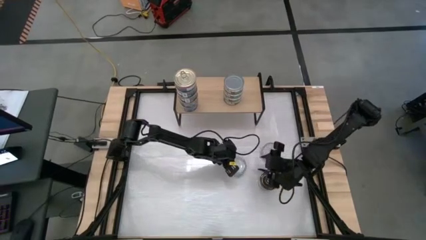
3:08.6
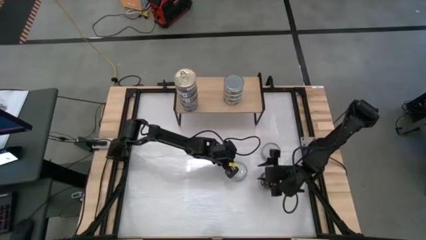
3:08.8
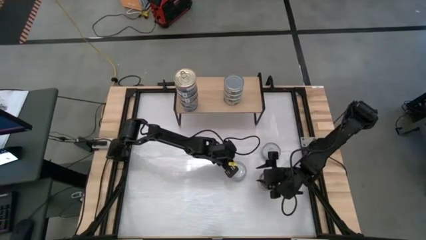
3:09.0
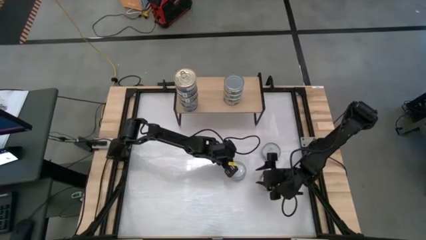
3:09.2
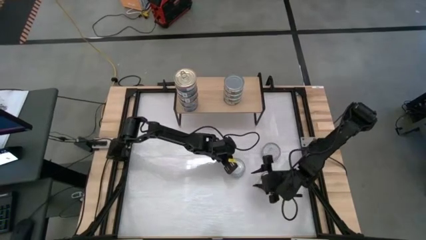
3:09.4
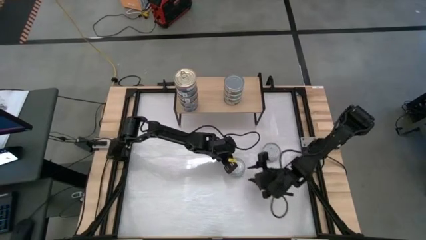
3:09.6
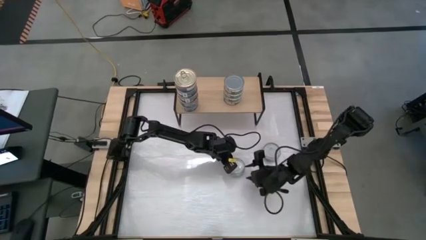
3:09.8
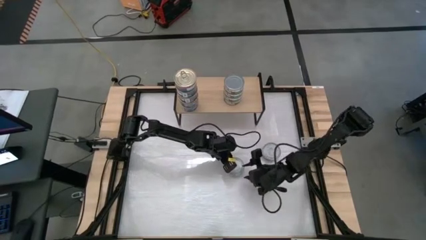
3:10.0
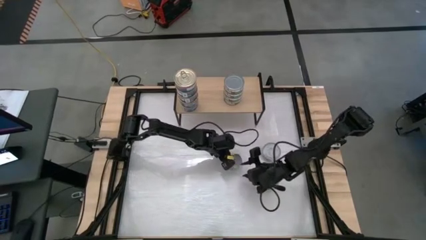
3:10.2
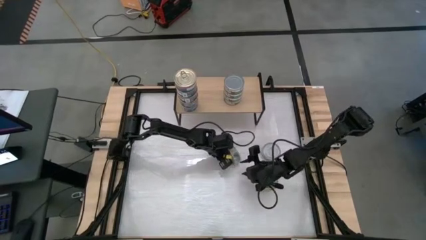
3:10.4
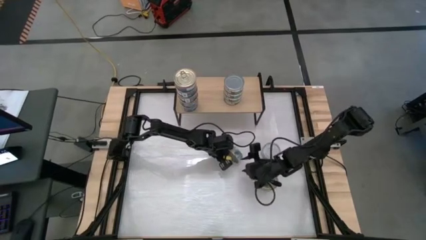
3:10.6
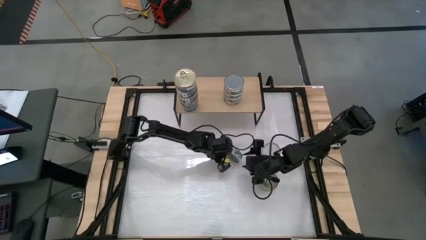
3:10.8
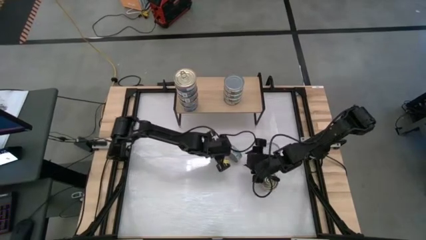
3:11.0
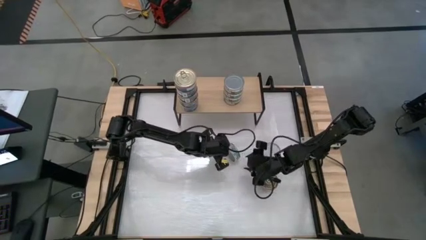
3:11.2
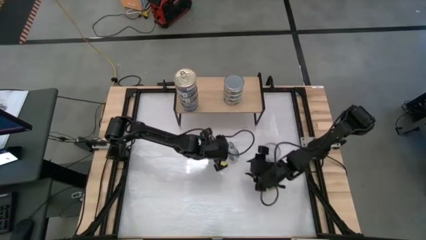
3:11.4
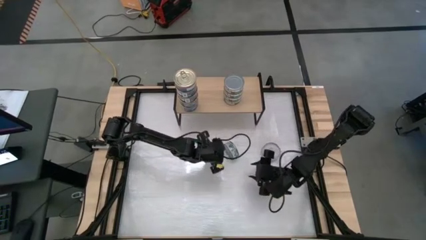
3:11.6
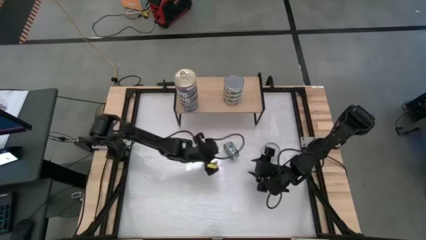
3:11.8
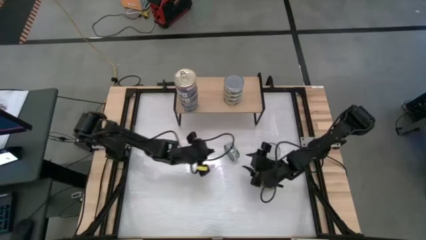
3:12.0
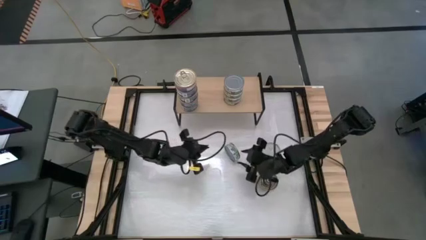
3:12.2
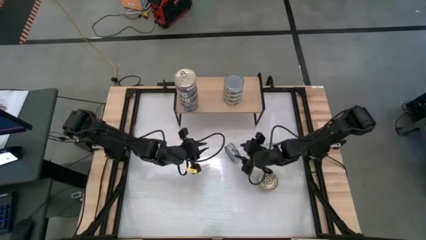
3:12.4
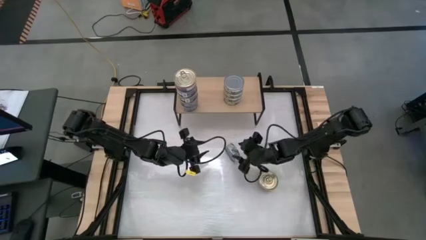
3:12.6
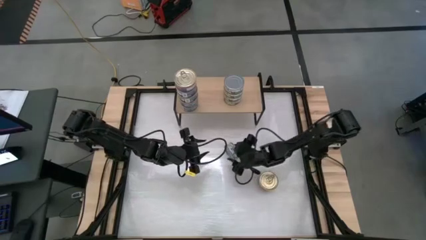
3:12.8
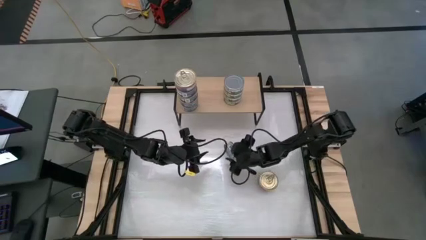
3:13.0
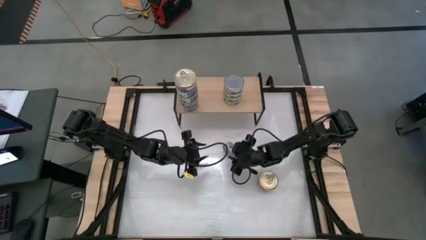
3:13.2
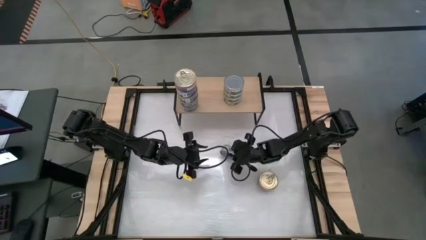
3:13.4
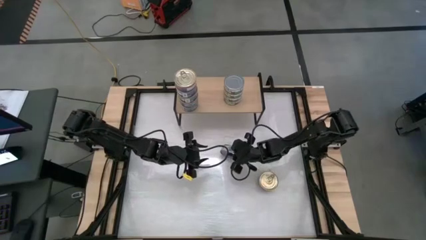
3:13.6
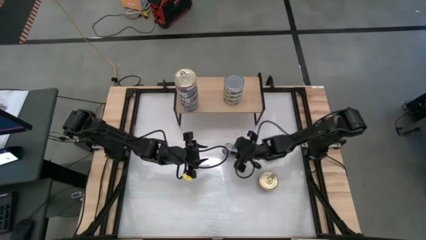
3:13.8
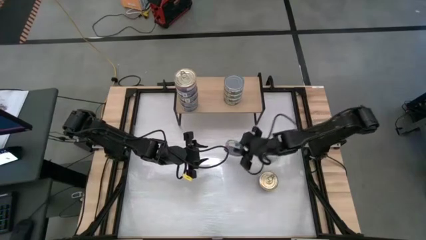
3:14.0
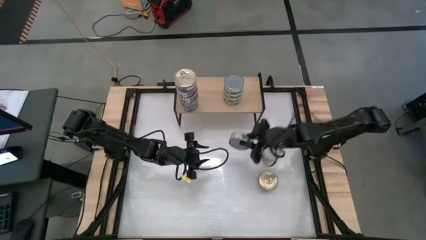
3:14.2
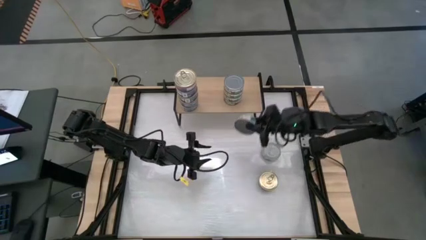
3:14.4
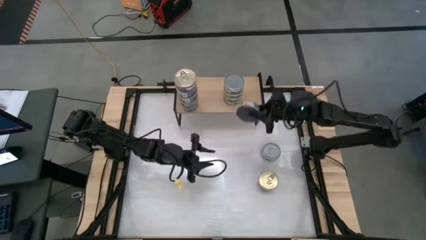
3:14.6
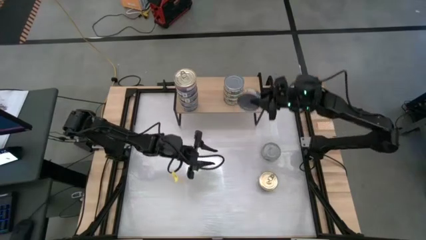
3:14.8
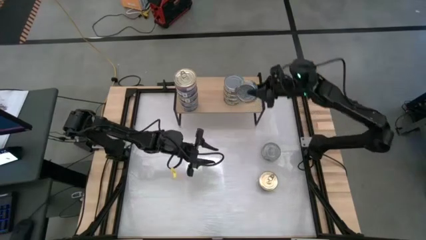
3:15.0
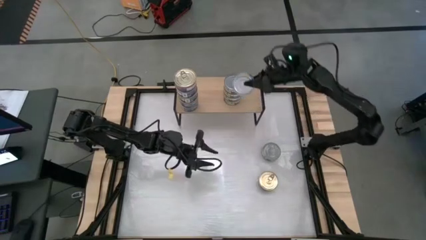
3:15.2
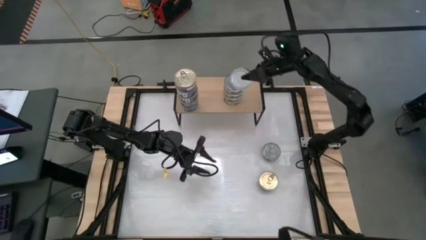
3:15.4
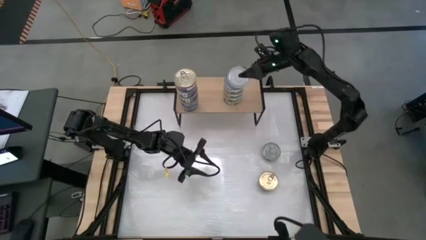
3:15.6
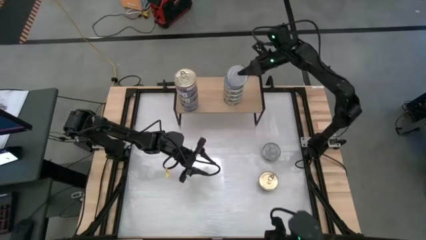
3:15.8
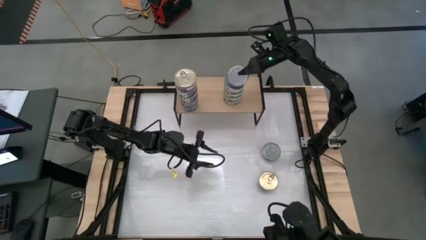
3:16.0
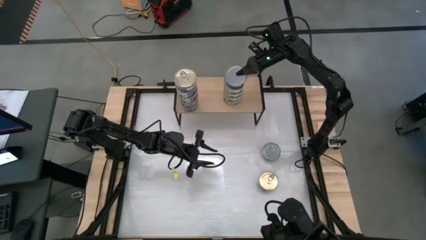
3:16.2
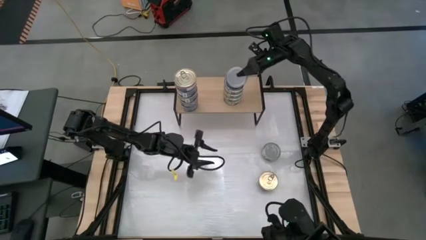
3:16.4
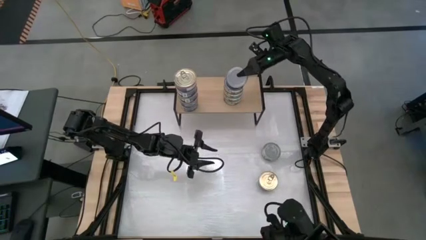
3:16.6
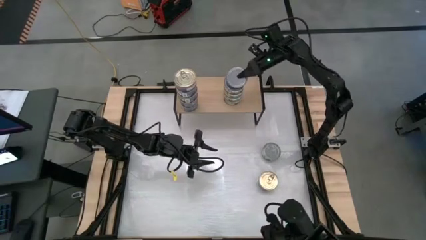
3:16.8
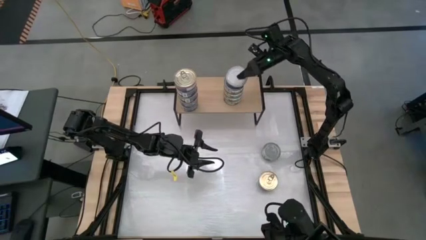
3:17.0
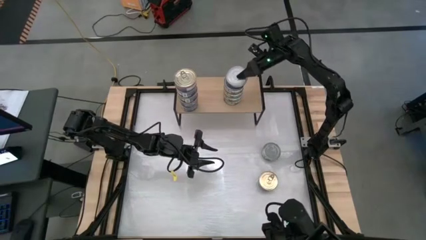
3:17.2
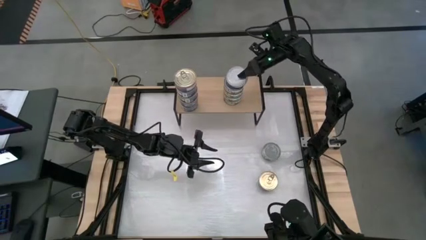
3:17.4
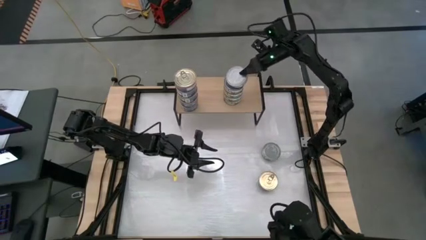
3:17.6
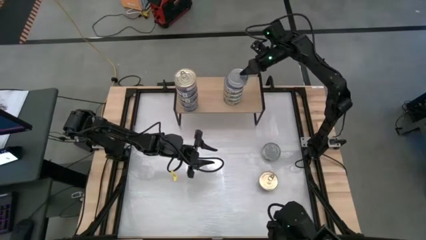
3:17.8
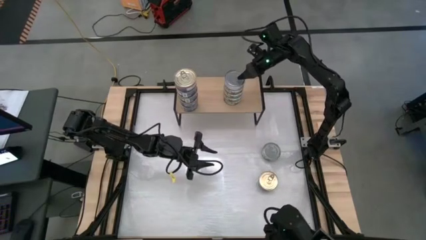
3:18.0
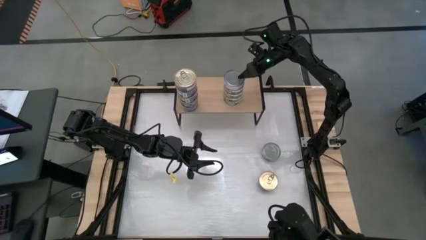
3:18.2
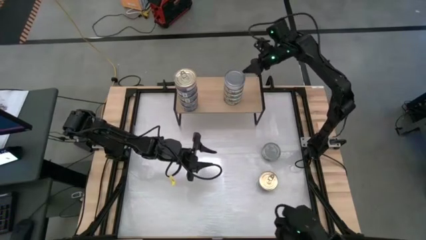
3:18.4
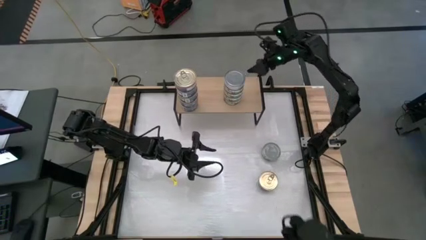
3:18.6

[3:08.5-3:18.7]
Task: Stack canned seafood by type on shelf
Stack the green tuna can on top of the other green tuna cans on the shelf

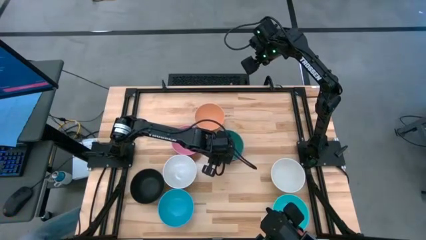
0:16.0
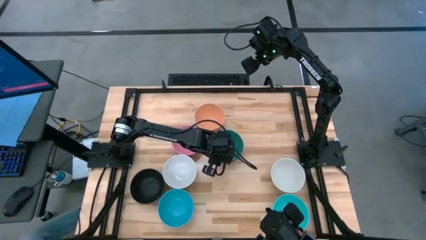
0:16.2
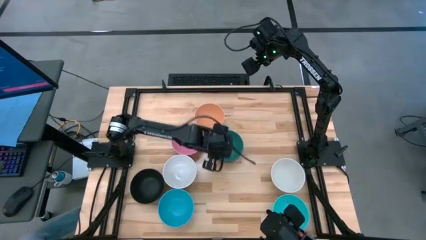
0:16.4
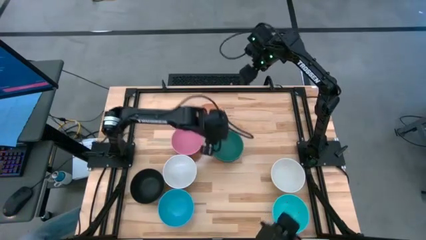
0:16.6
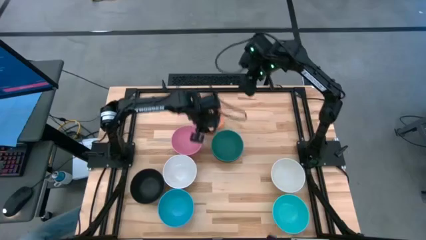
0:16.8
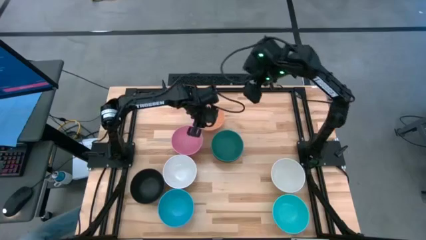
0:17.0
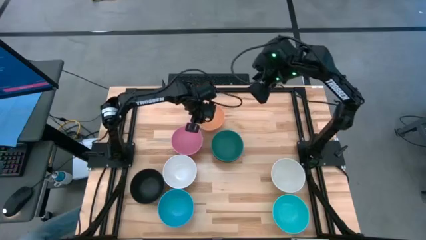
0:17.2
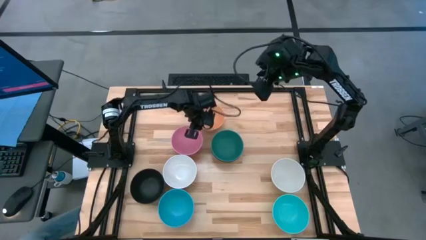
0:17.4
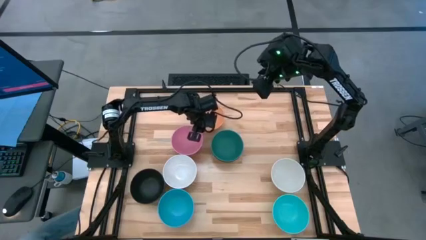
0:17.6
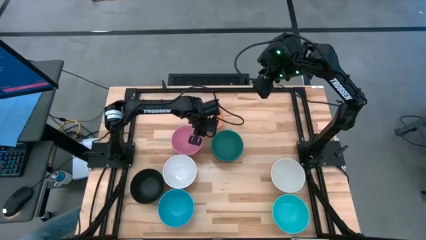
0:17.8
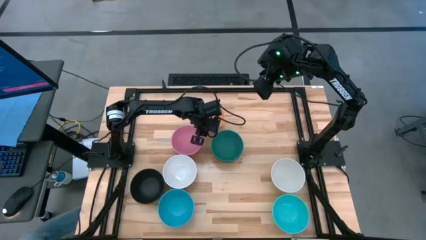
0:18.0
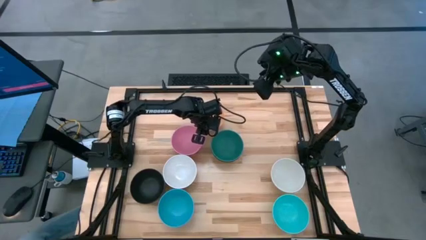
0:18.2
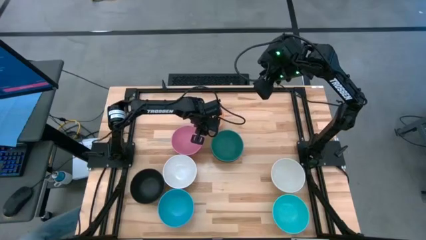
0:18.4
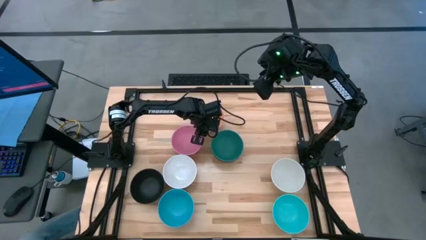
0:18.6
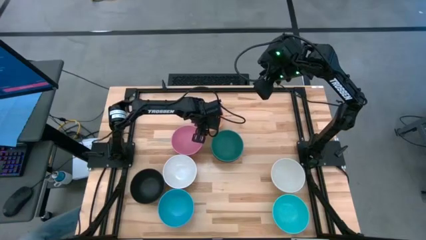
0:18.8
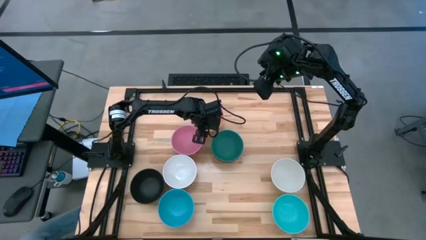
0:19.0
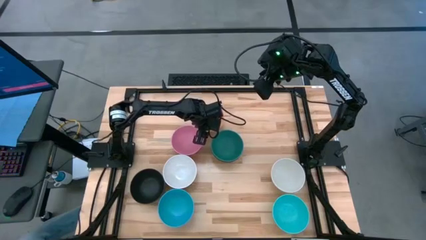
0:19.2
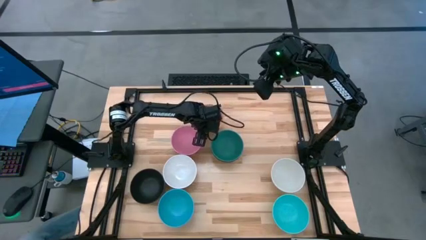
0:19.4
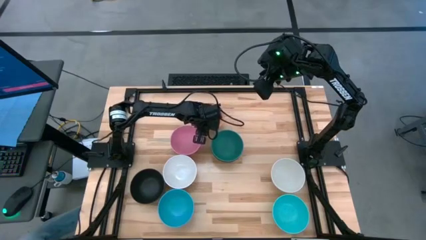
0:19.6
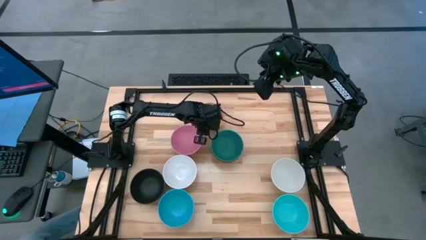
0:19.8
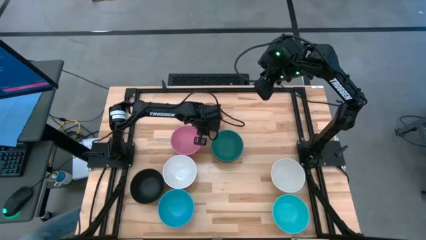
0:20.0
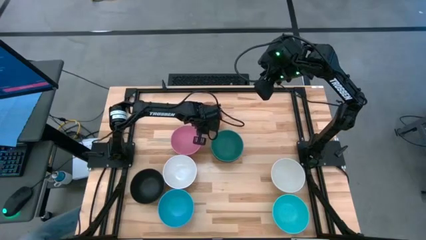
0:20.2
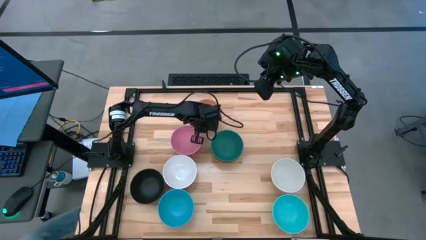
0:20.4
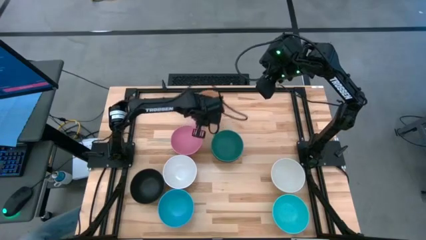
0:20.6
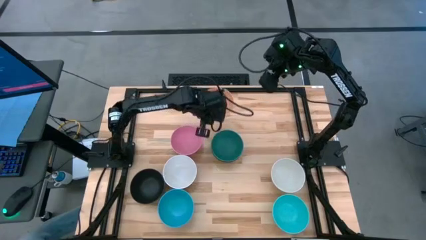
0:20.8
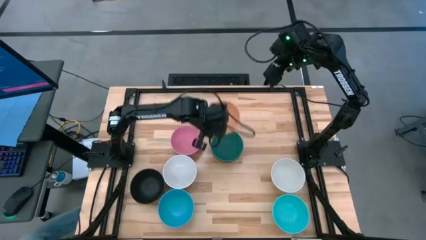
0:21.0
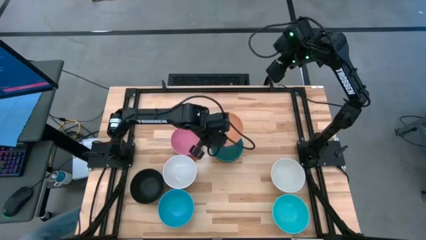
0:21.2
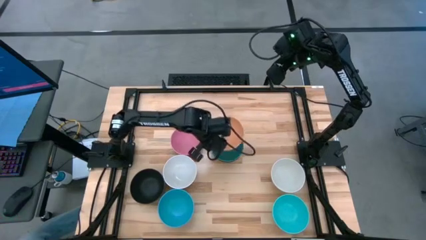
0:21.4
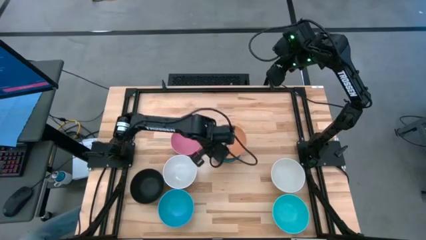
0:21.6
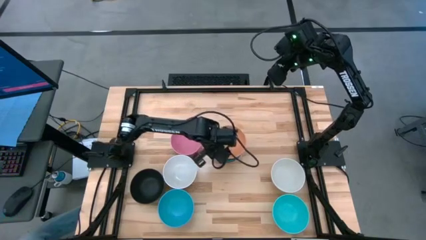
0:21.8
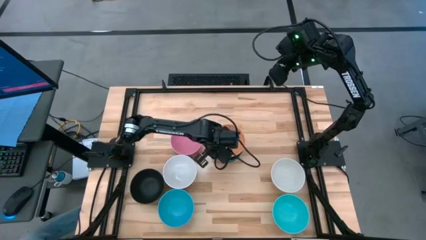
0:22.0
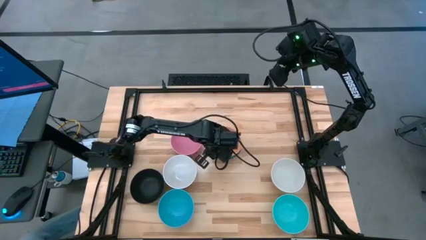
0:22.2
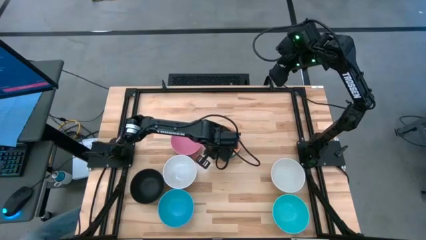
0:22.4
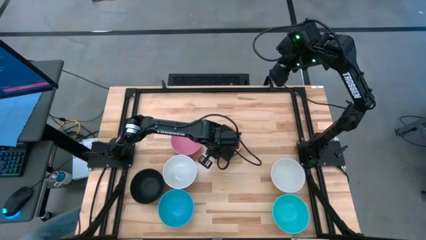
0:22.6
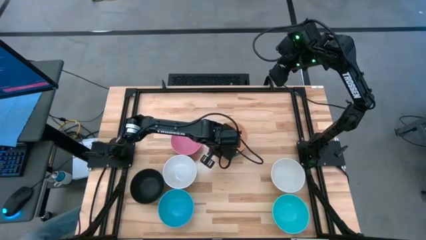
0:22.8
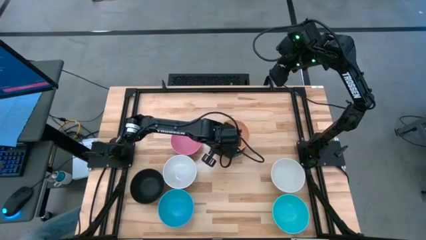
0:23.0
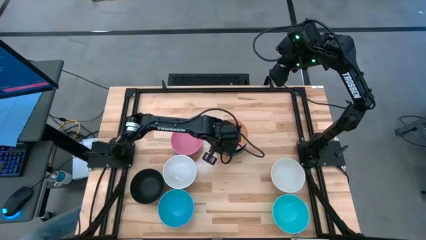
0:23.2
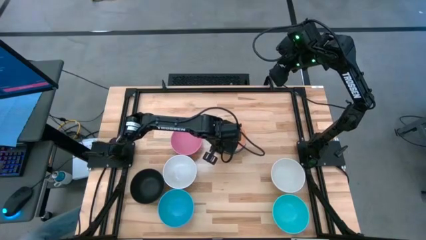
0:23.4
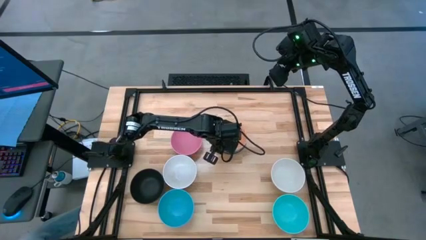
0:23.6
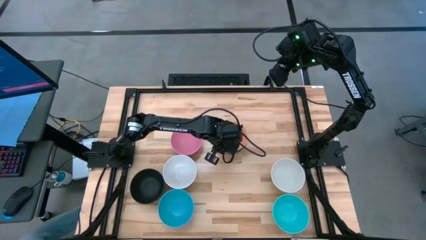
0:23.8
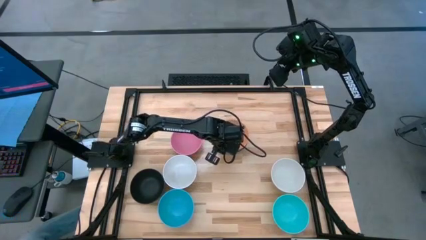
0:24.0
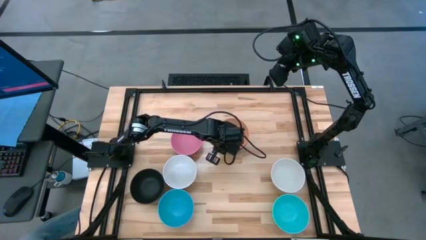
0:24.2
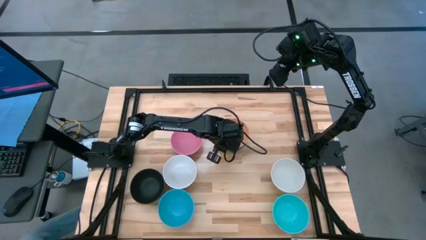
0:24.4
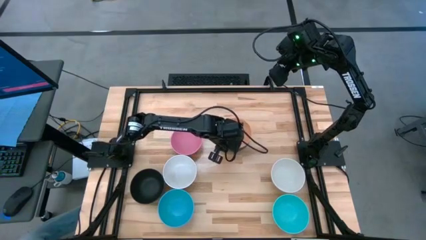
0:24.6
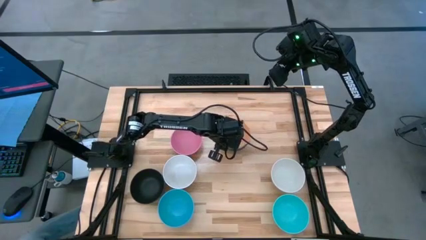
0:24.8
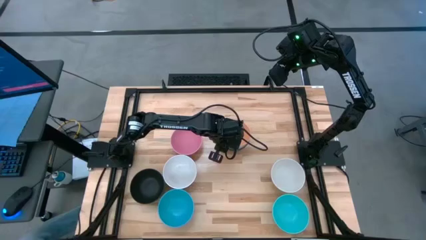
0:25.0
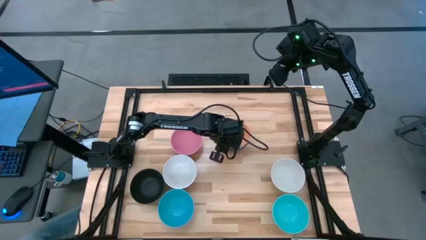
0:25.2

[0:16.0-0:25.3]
Task: Nest bowls inside each other
Stack the orange bowl on top of the dark green bowl
